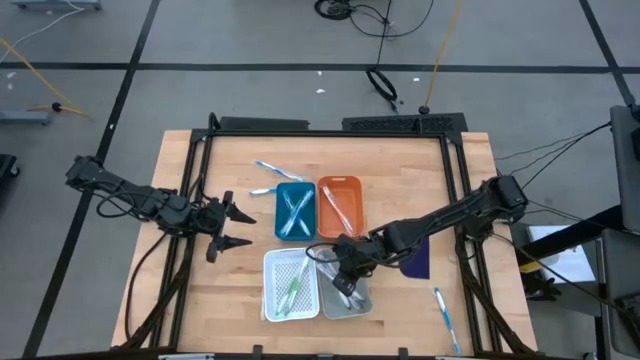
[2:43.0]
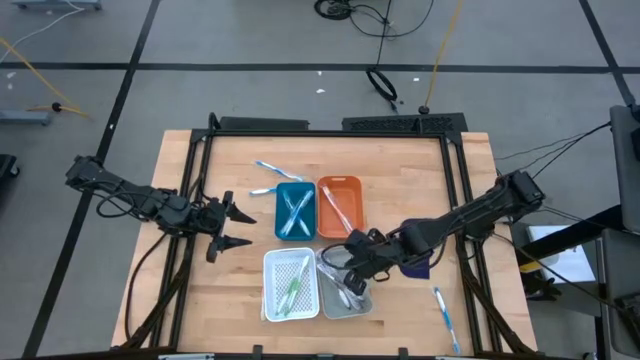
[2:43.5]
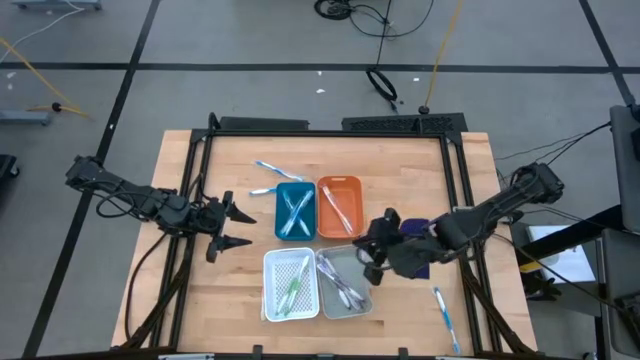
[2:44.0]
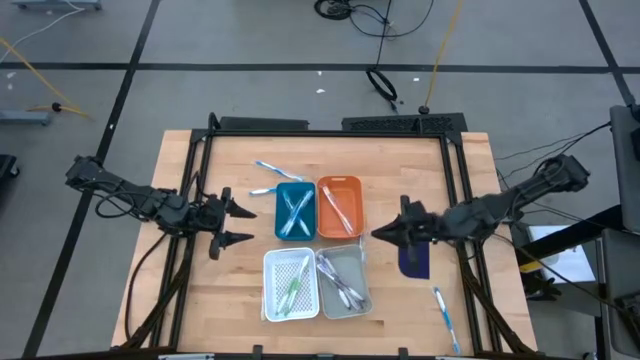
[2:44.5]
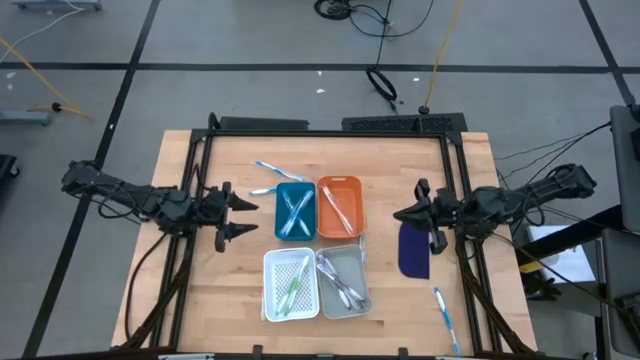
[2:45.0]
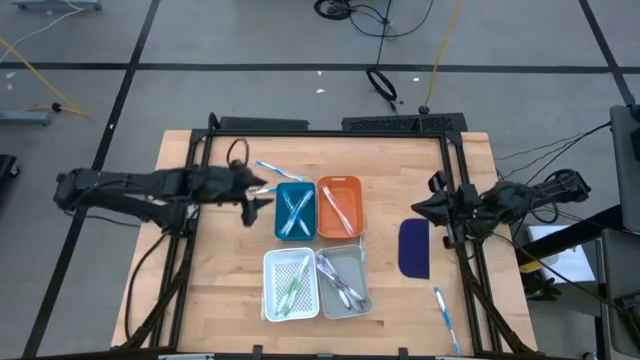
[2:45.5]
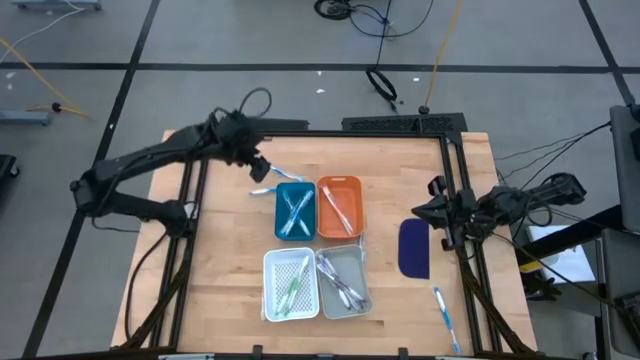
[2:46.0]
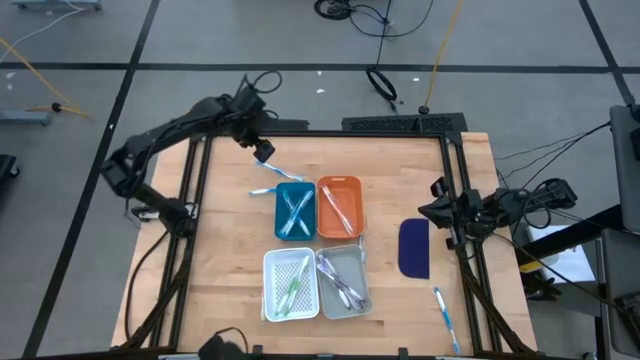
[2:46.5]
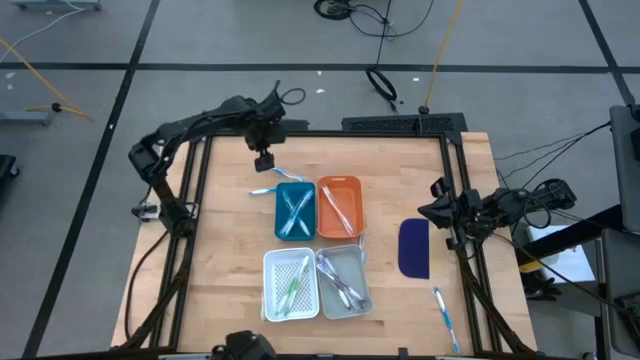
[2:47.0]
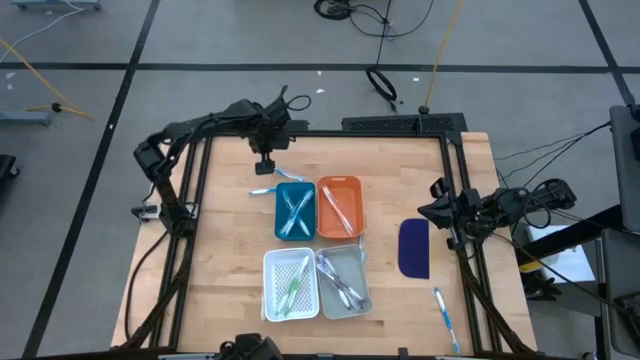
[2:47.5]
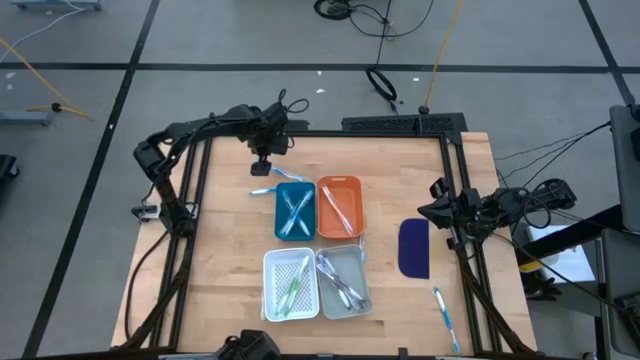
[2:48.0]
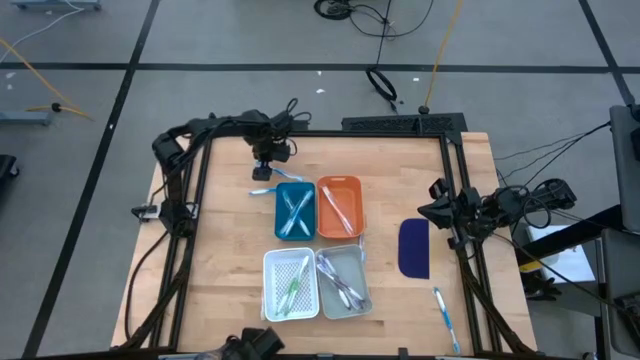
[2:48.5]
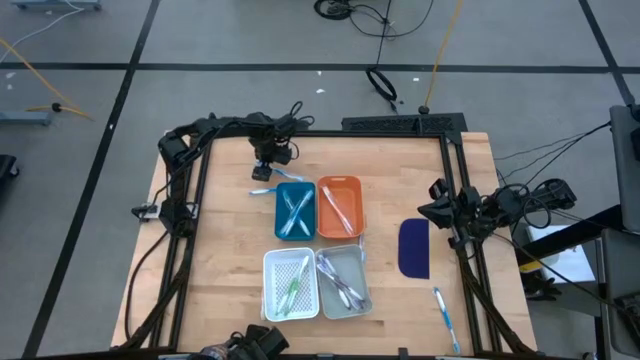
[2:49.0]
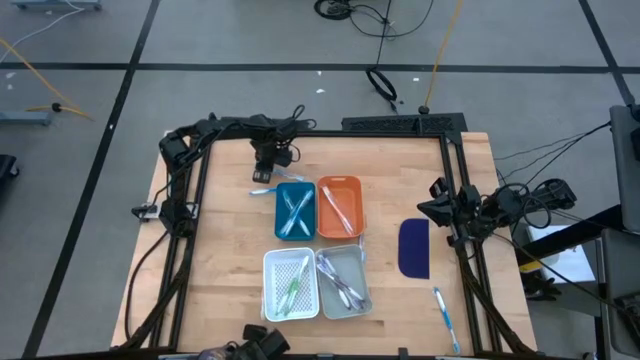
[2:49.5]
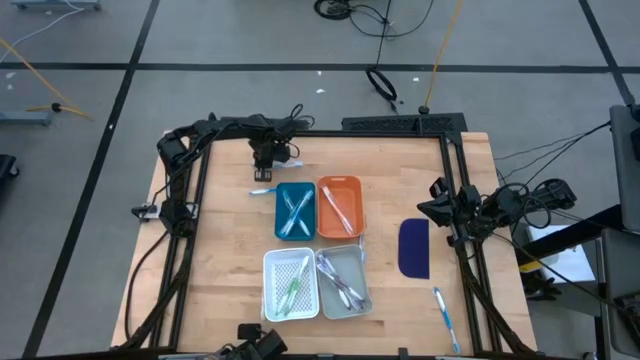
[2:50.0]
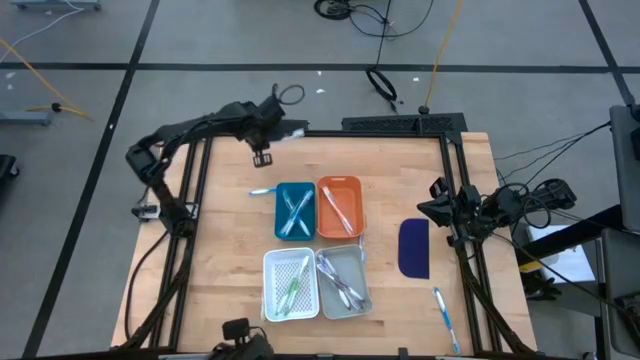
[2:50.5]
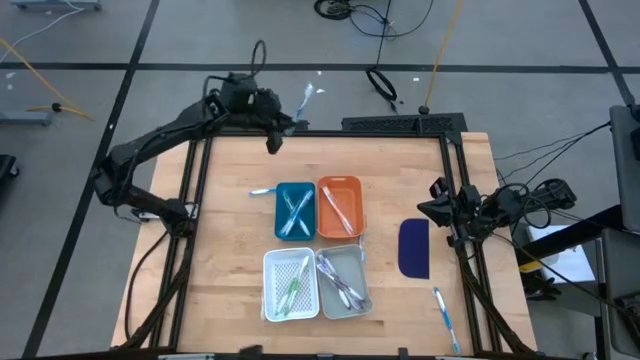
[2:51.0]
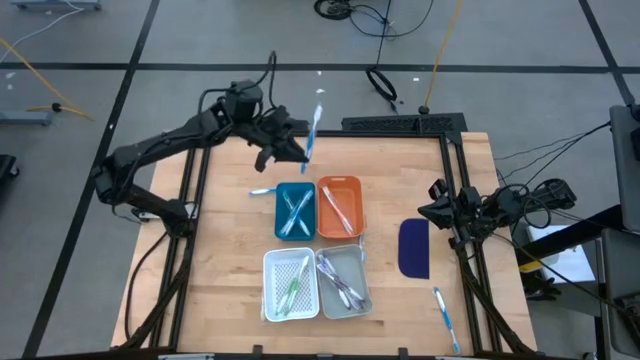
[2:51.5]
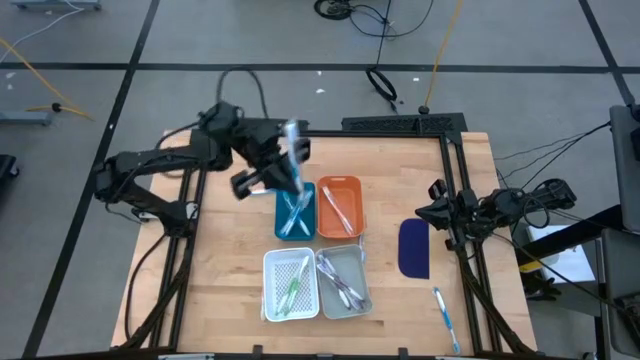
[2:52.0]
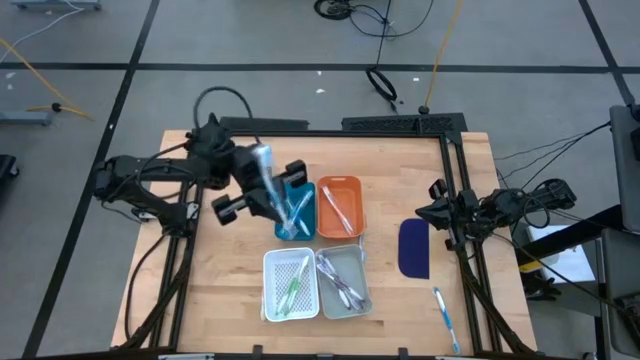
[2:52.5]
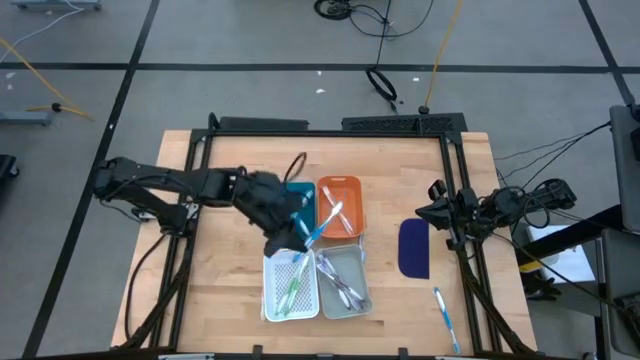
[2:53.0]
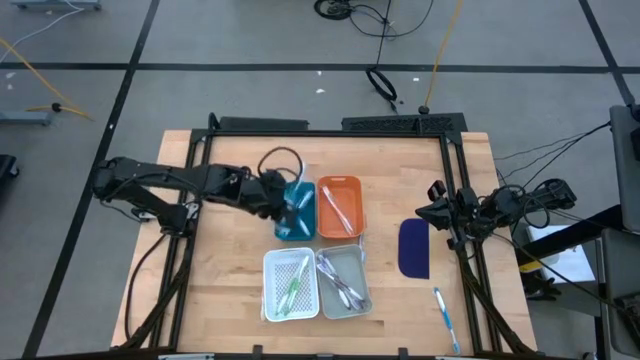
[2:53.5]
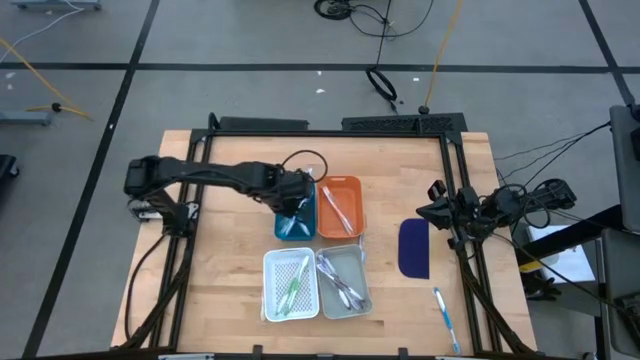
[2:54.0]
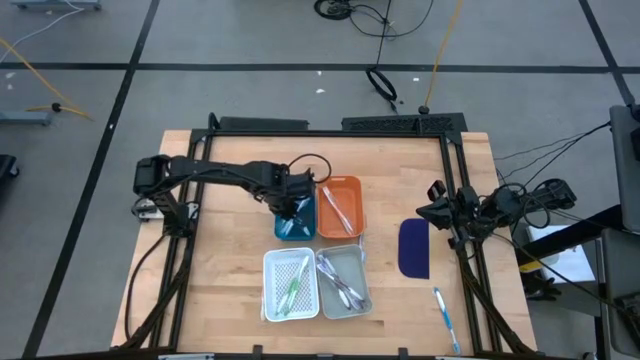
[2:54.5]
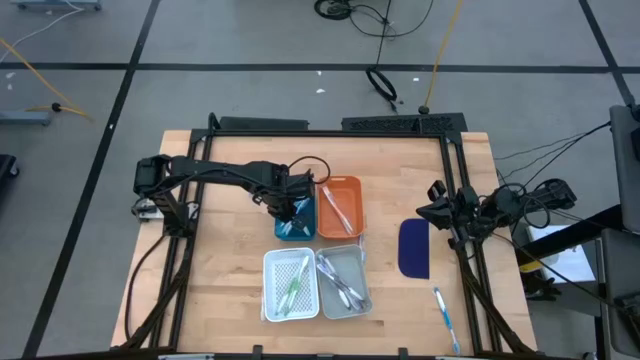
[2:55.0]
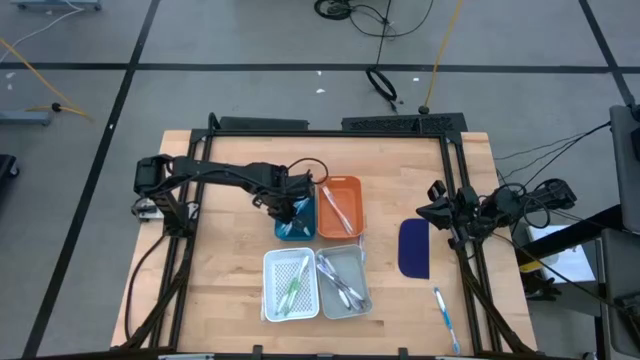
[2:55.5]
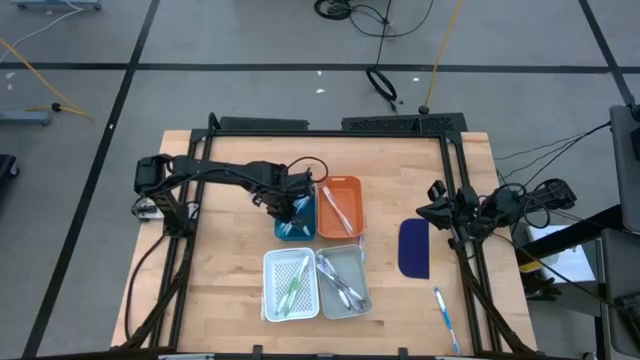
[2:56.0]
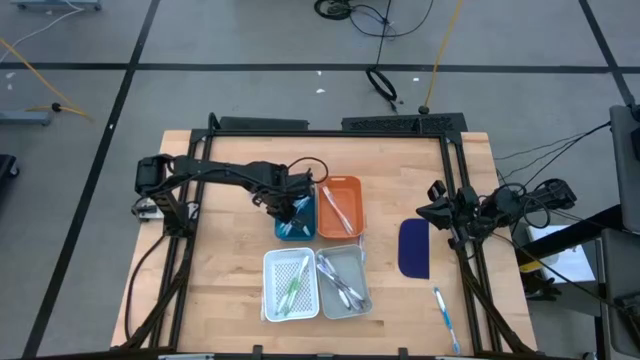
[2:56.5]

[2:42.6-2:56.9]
Task: Pick & Place Toothbrushes
Put the blue toothbrush into the blue bin

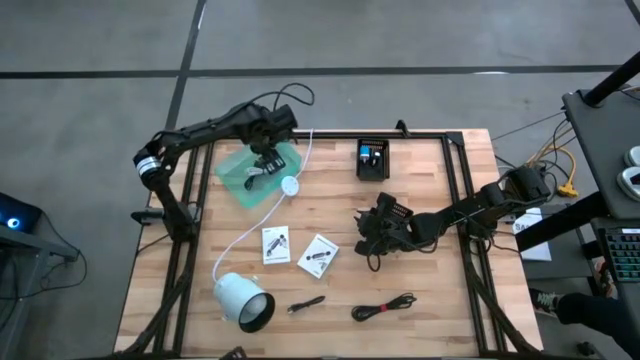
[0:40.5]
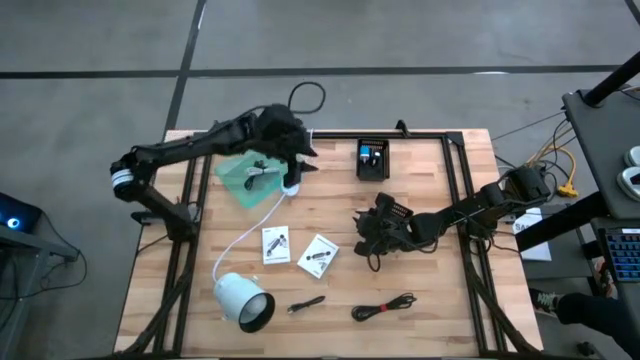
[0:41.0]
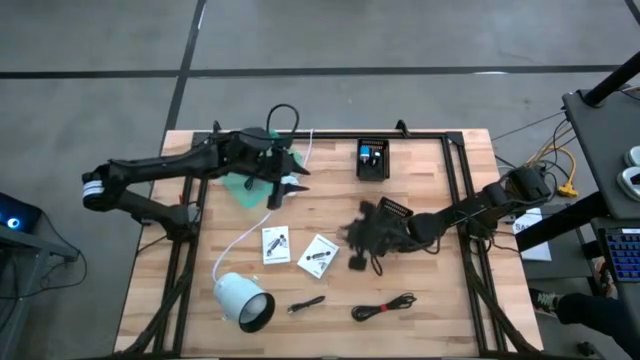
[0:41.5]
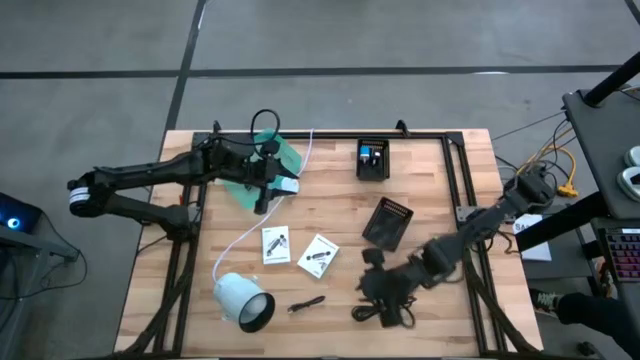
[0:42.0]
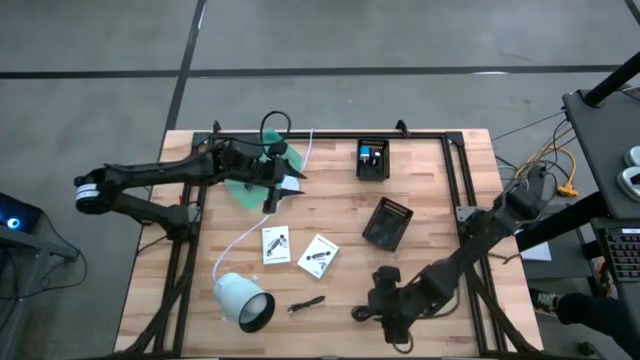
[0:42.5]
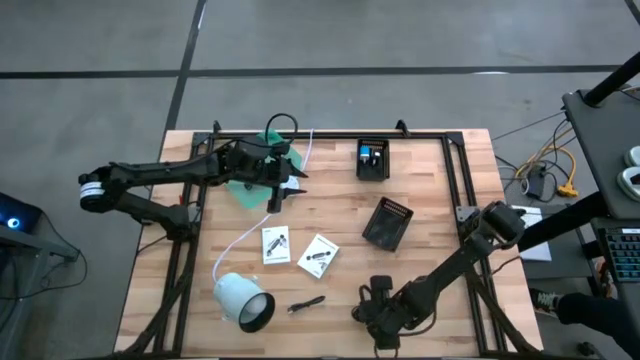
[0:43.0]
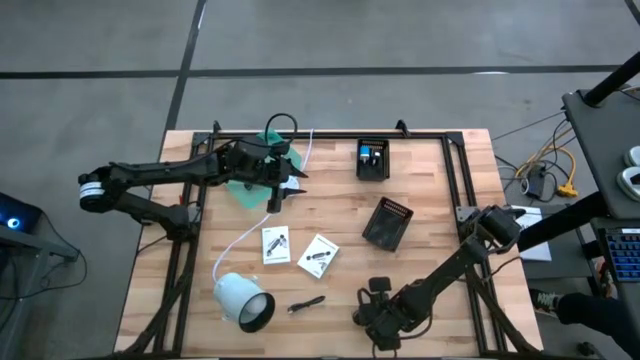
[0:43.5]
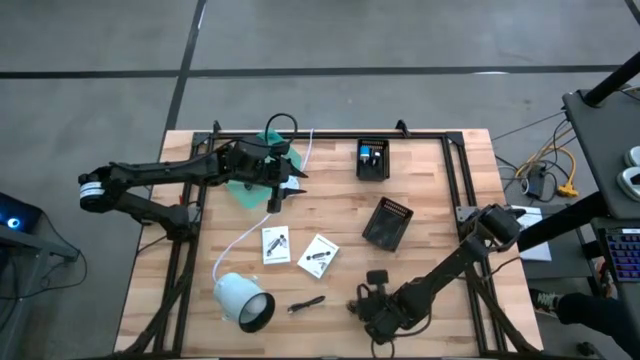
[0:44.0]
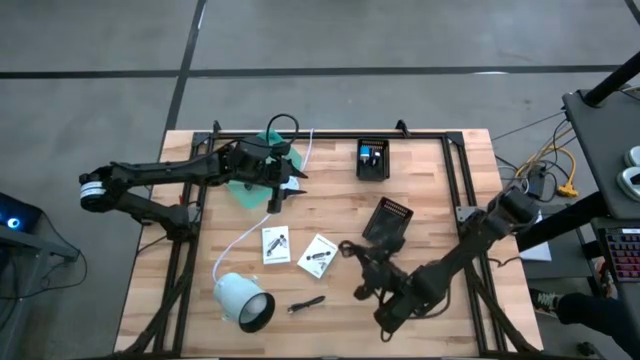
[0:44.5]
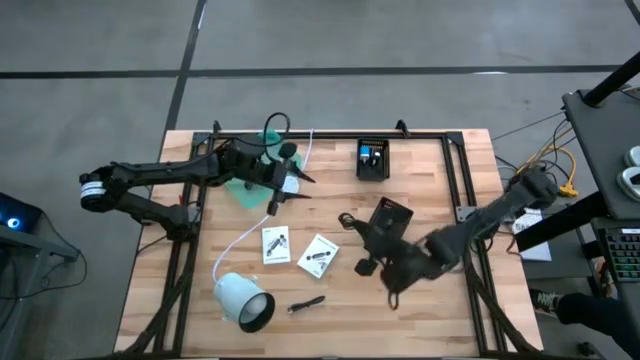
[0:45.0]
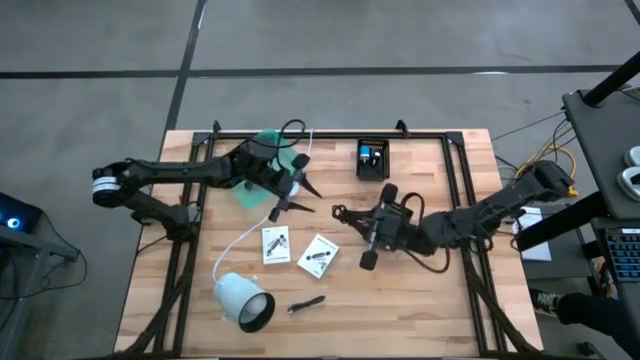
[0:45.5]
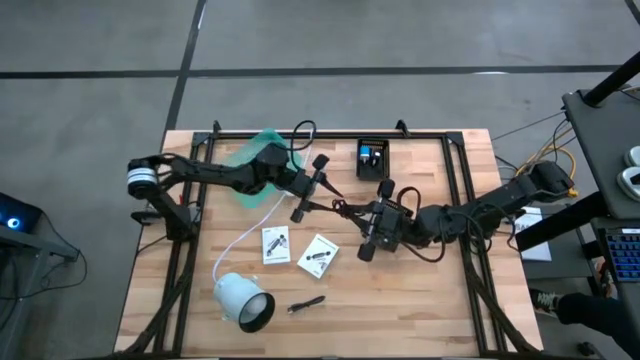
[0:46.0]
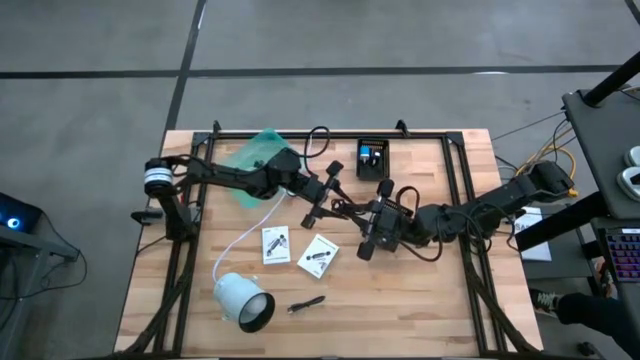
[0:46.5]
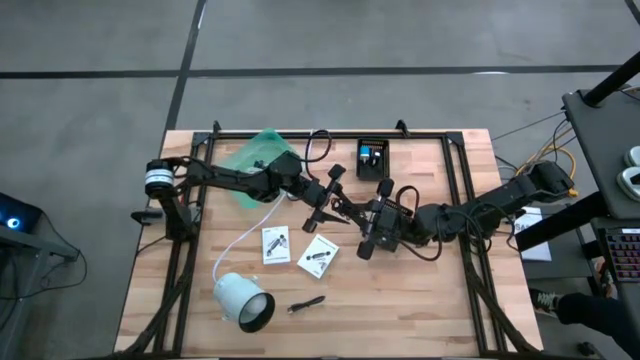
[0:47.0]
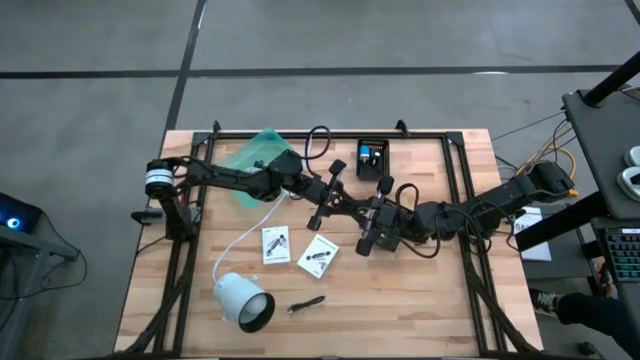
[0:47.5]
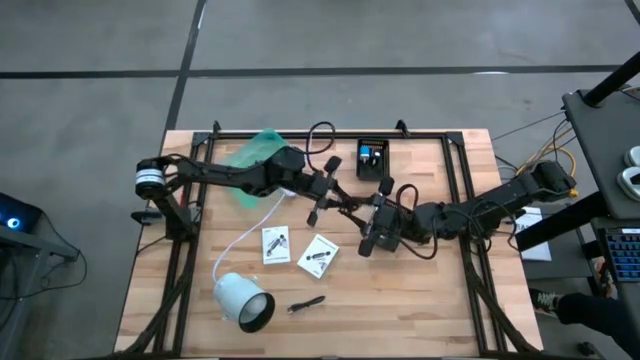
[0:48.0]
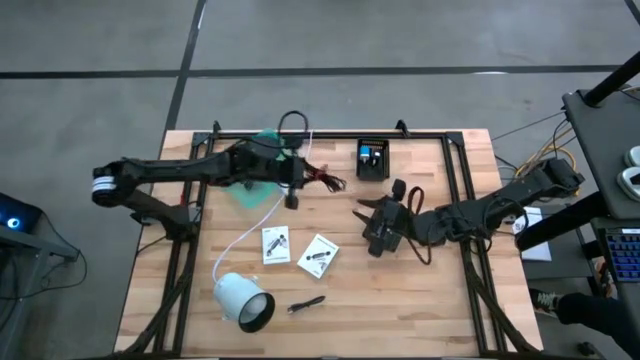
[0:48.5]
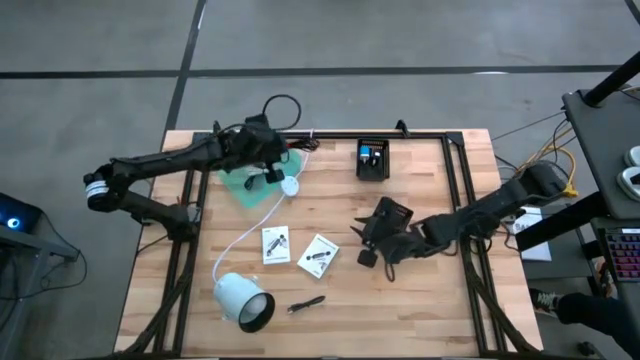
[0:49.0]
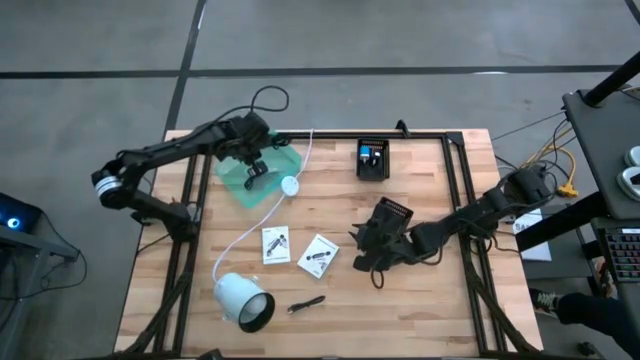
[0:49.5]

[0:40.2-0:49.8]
Task: Pick and place items into bin
Put the right black charger cable into the green bin
